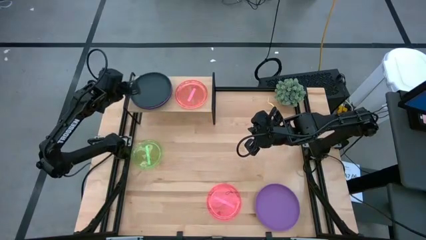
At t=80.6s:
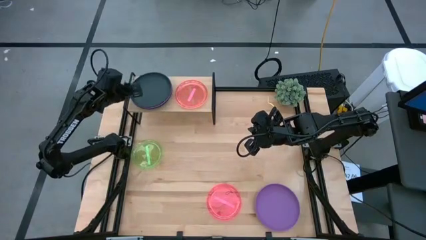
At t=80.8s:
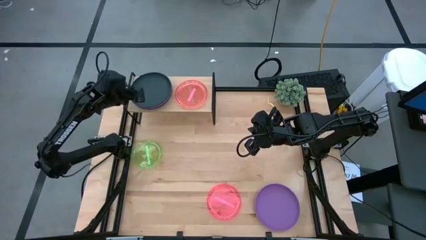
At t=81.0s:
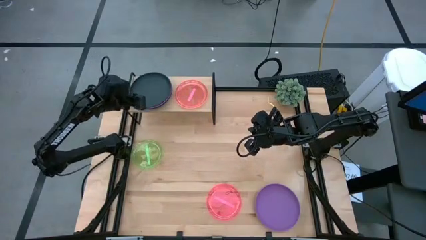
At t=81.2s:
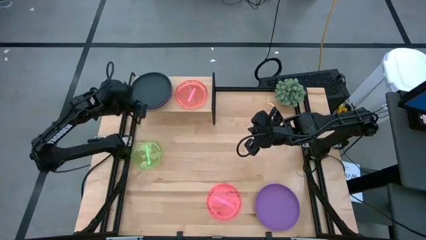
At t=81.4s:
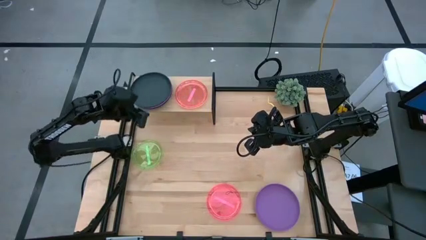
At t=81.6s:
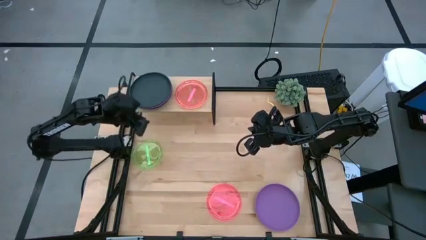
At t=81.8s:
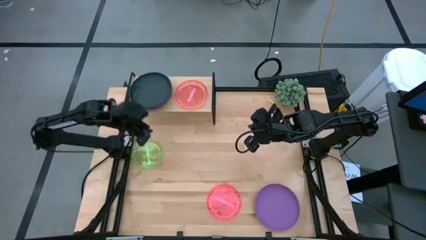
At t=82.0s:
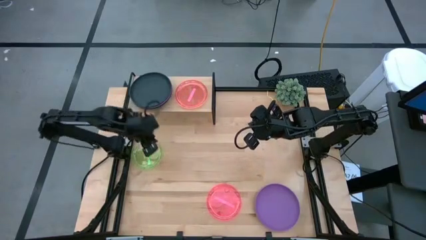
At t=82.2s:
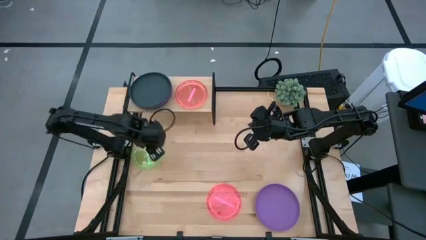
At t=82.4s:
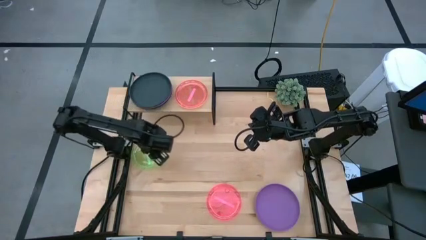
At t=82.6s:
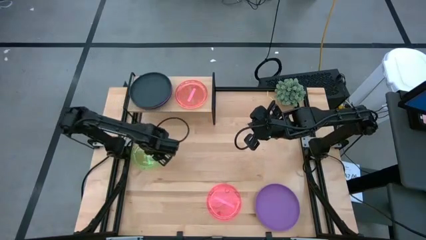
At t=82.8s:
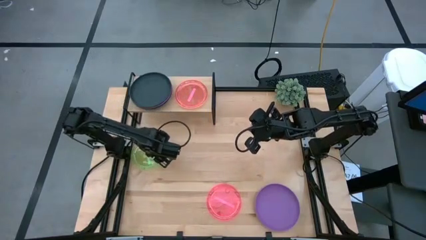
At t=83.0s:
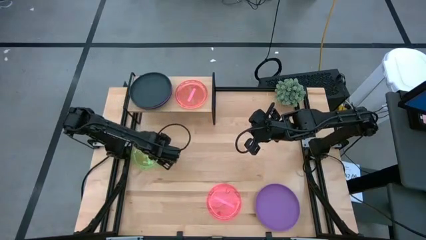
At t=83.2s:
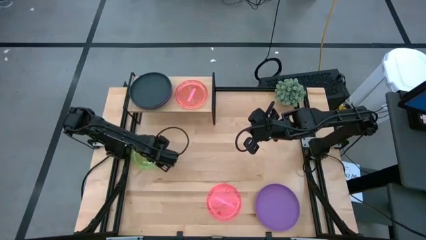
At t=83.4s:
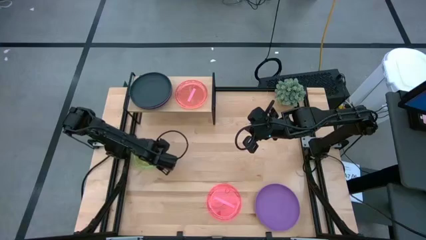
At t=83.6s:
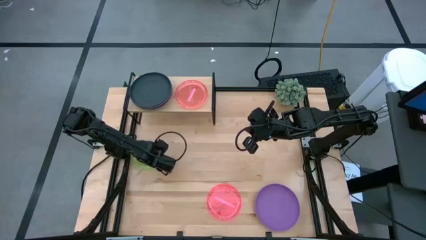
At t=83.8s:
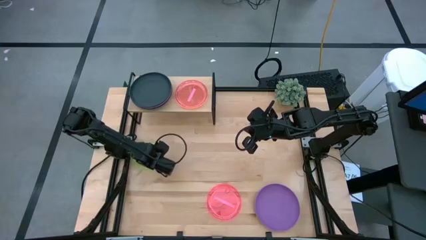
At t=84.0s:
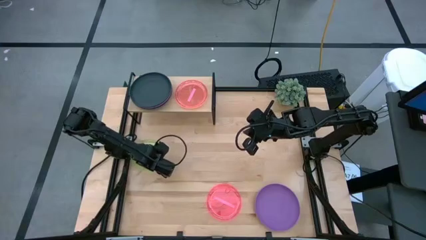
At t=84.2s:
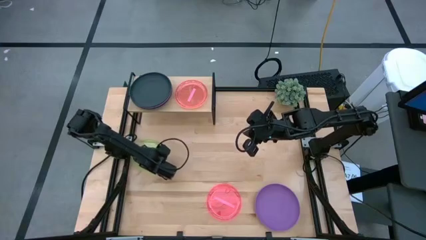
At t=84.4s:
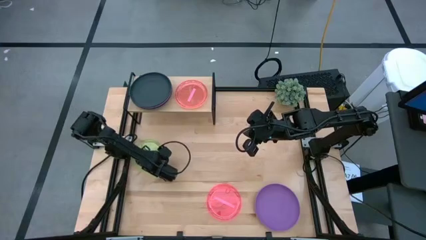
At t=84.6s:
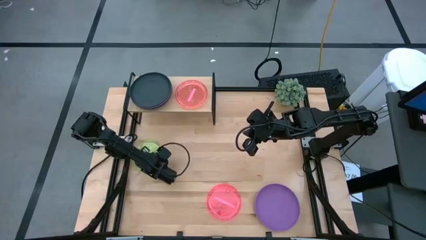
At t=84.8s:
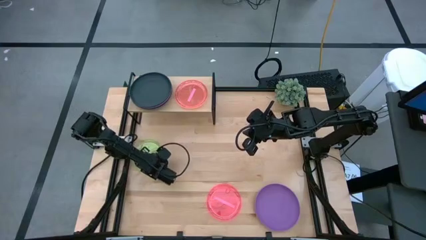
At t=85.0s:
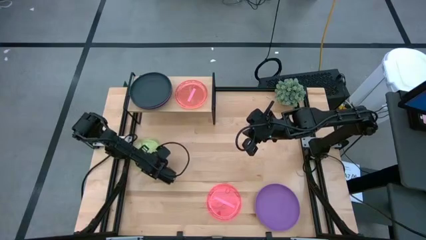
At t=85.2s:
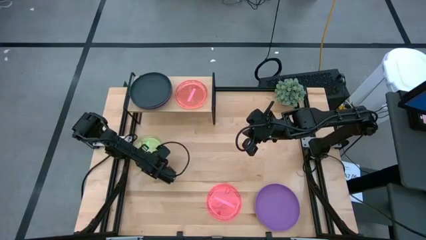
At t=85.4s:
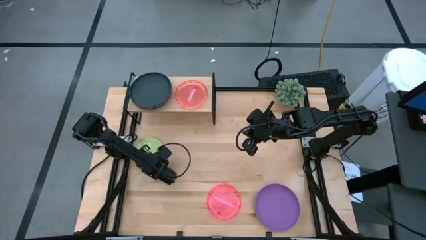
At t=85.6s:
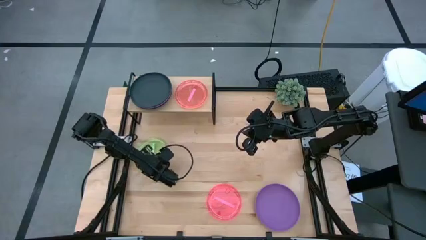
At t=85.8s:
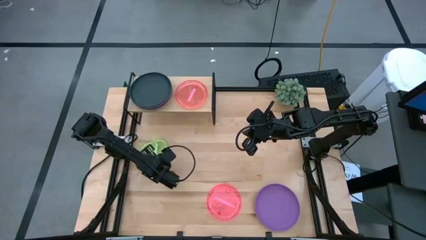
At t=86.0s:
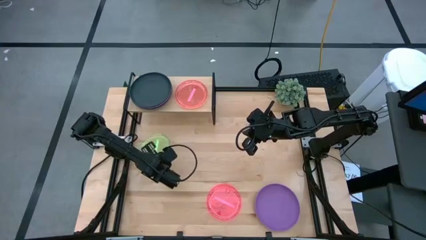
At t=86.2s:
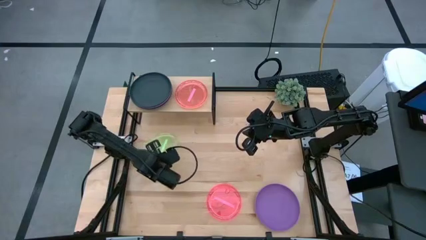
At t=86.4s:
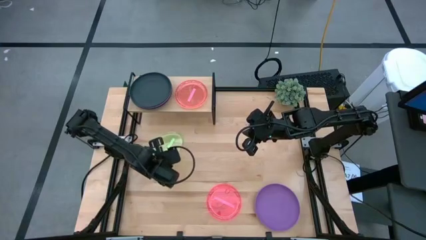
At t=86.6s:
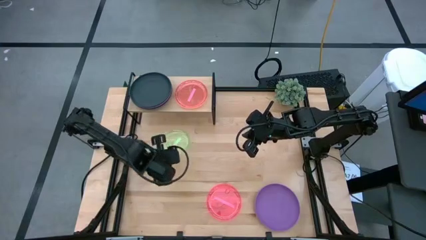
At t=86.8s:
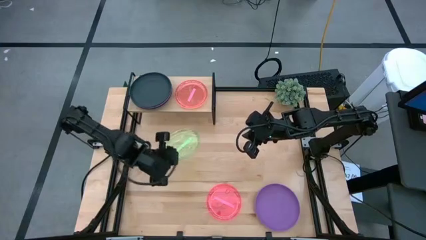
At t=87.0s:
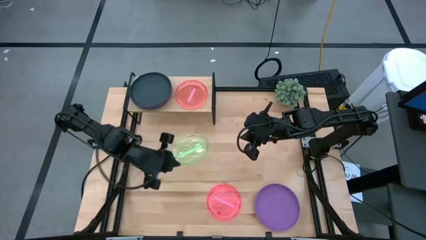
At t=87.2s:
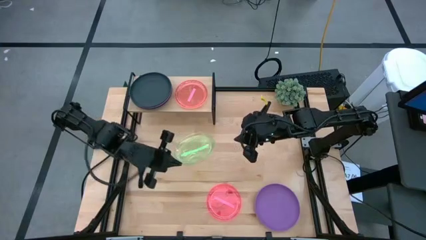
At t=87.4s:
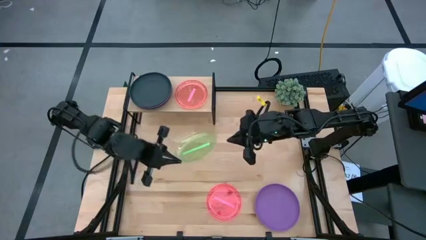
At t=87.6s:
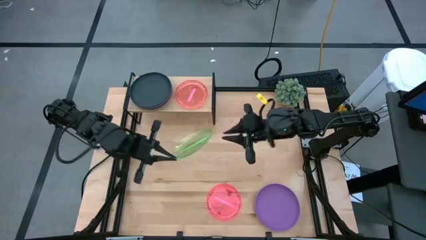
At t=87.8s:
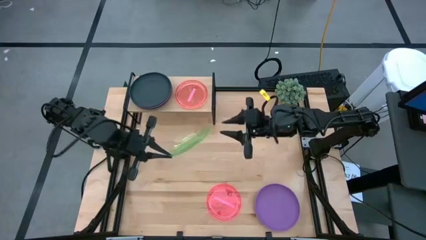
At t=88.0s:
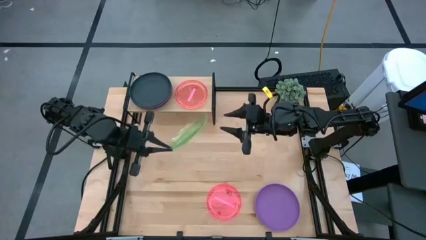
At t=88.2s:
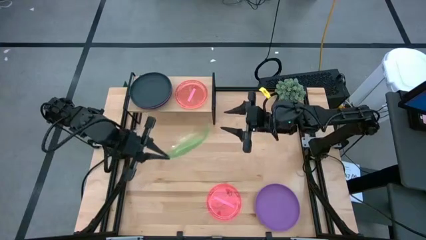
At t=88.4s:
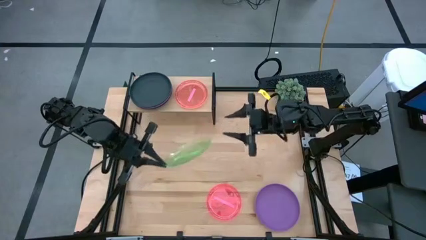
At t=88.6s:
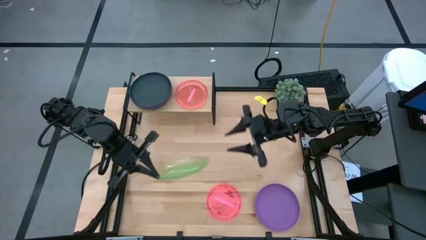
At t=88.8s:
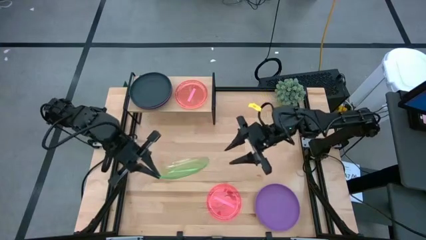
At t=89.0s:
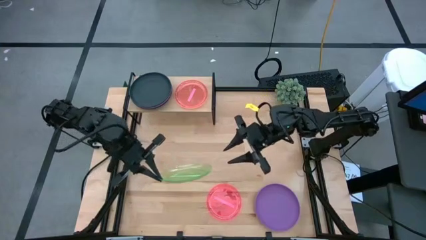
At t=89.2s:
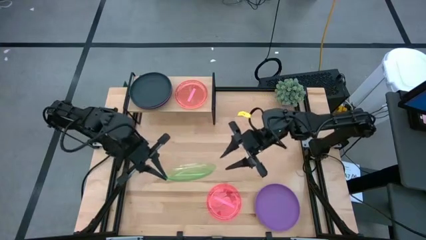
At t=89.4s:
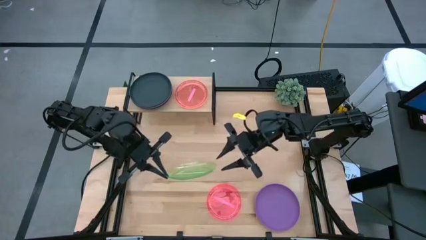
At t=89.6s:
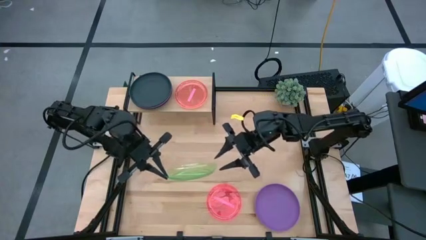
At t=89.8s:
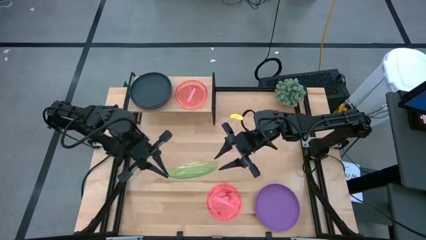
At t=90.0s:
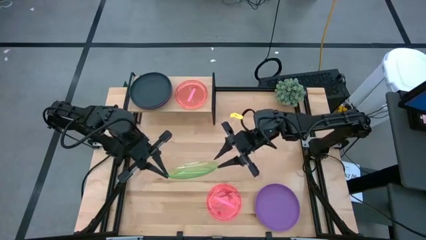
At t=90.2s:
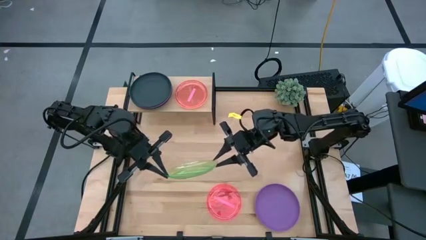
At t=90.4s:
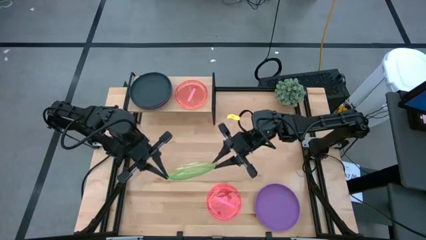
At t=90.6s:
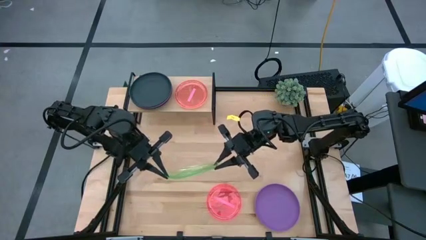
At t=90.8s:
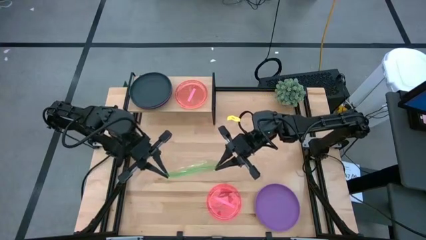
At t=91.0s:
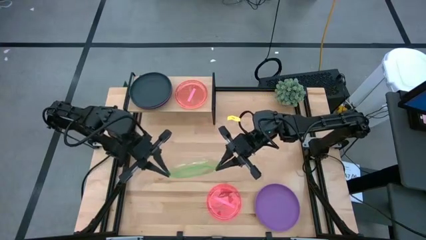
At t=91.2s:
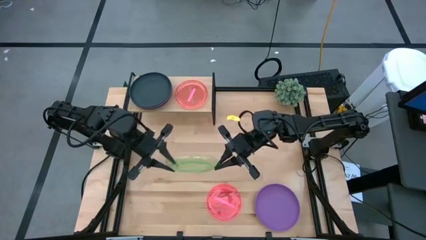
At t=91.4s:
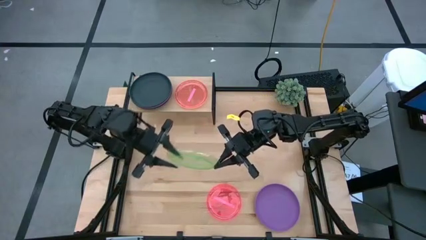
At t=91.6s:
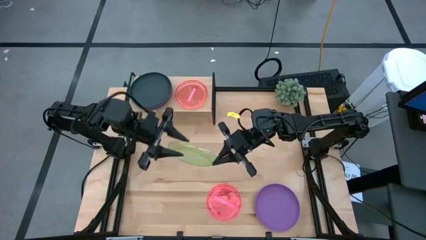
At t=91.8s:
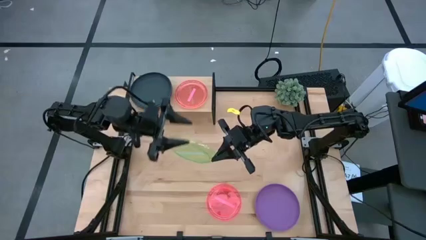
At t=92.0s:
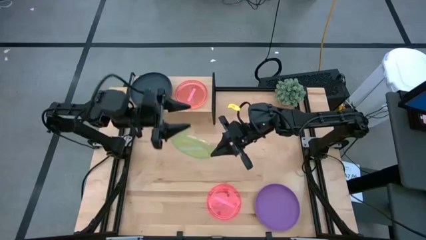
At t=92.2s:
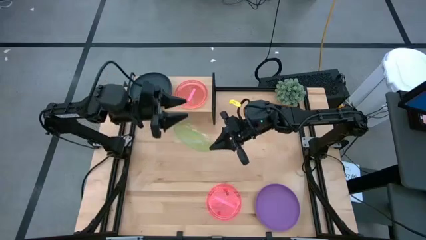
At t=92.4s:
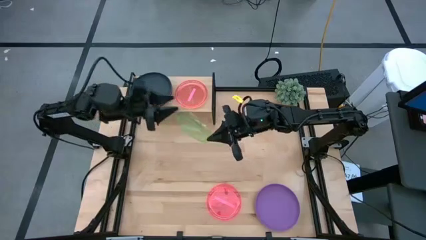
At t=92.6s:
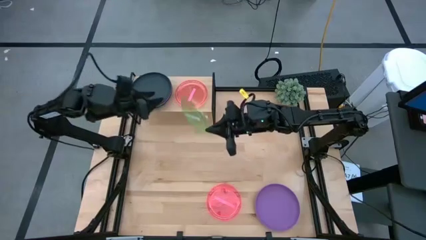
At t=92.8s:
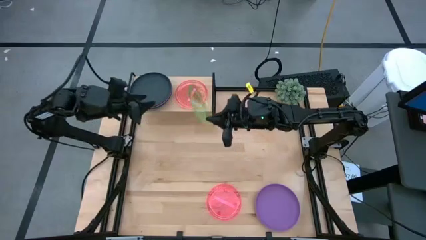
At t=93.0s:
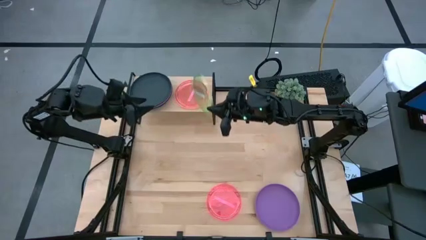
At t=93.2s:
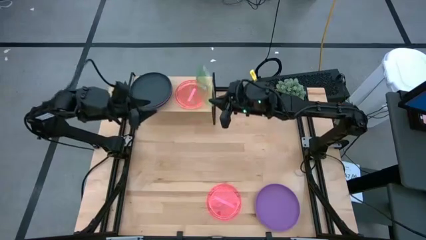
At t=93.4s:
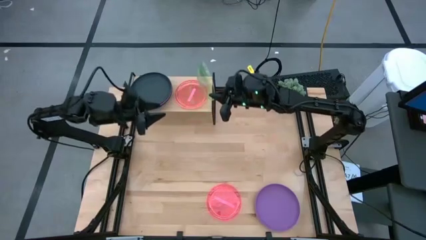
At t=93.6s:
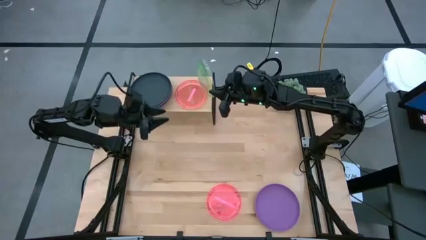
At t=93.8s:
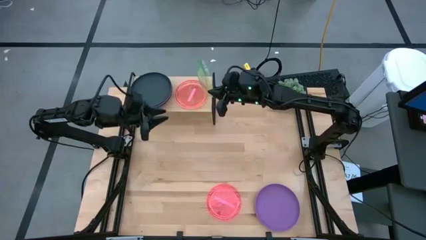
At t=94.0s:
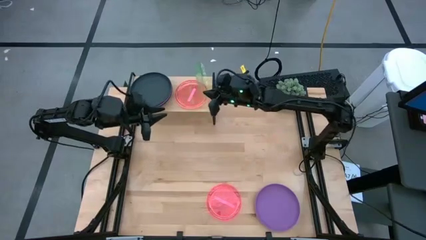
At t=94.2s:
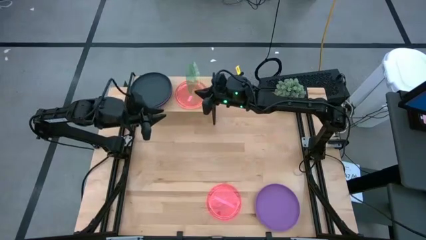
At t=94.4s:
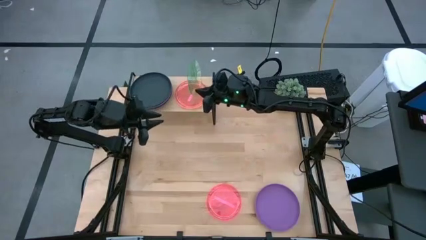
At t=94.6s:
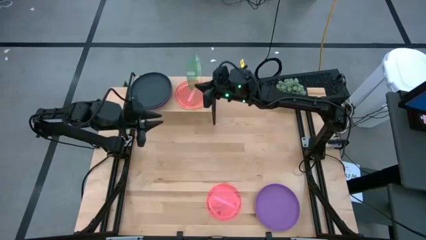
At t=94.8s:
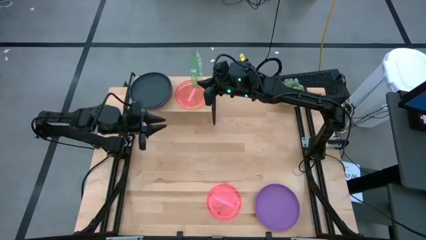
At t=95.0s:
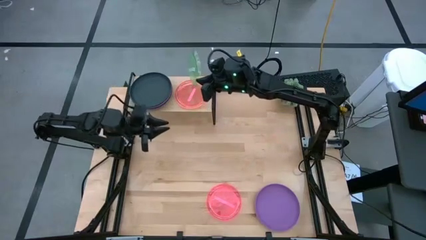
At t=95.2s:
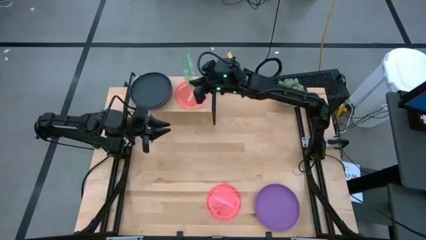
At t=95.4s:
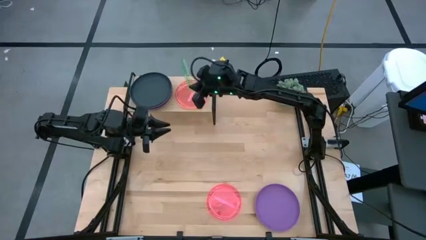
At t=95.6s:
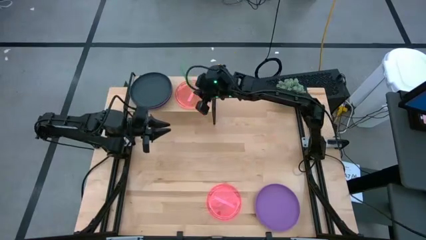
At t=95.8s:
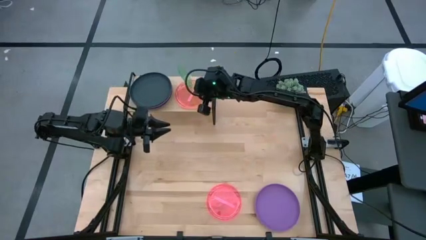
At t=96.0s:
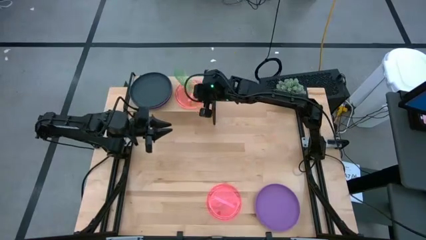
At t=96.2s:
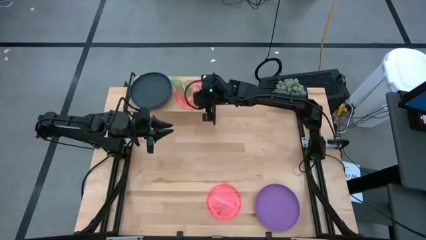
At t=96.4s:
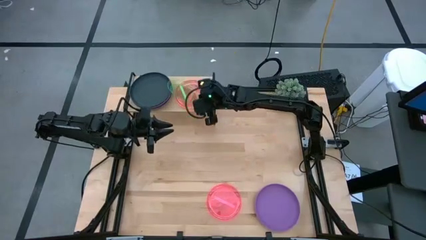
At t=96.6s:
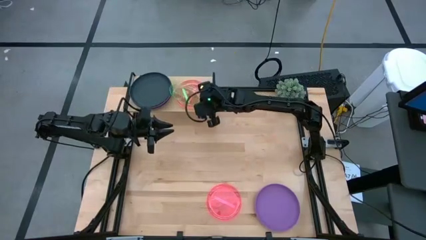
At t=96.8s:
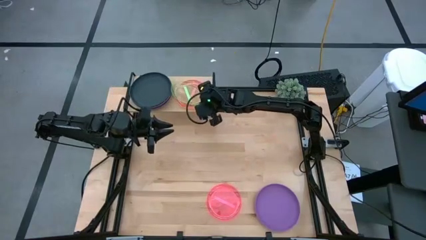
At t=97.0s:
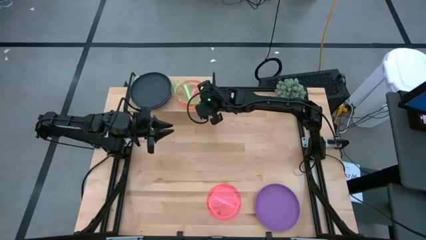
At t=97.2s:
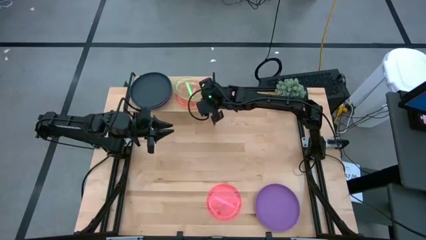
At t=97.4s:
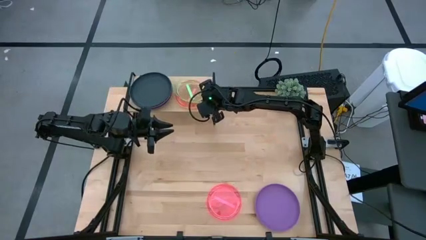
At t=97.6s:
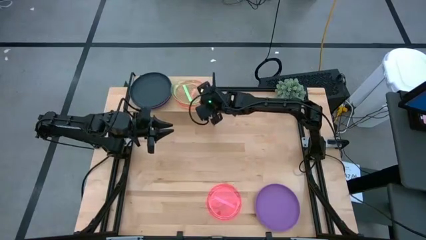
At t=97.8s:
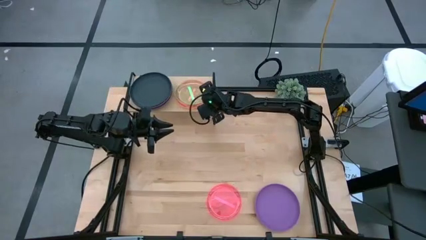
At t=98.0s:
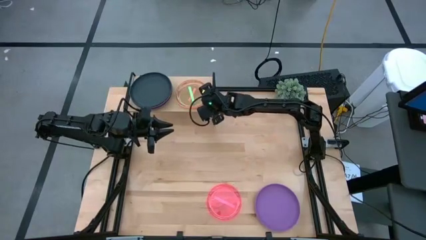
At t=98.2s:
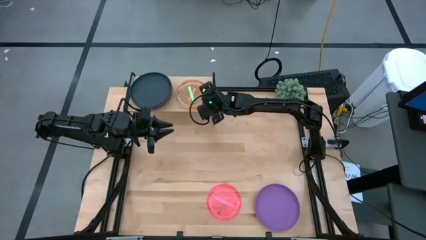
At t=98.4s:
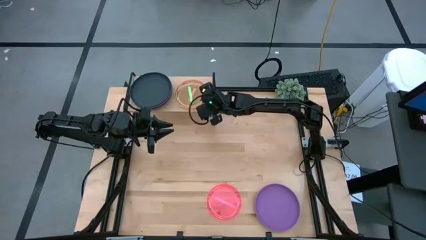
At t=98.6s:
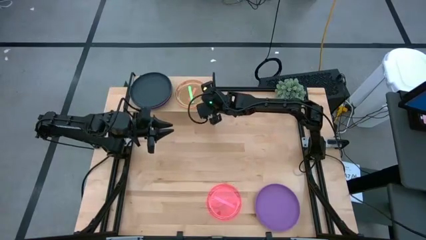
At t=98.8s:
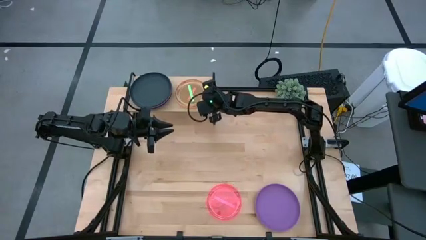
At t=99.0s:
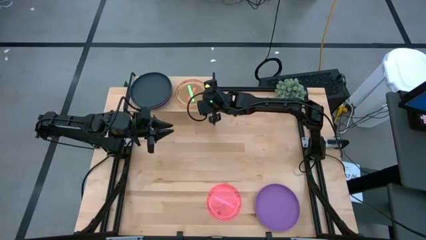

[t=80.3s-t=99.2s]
Task: Place and stack plates onto a shelf
Stack the green plate on the pink plate
